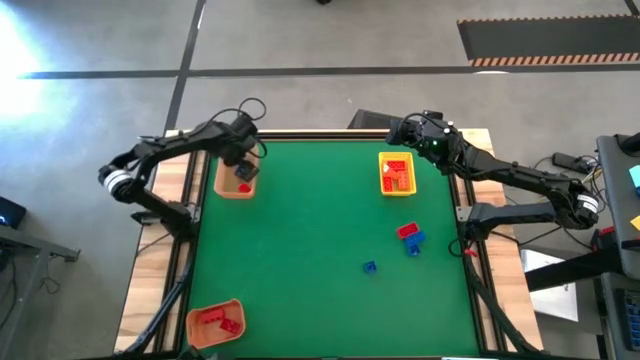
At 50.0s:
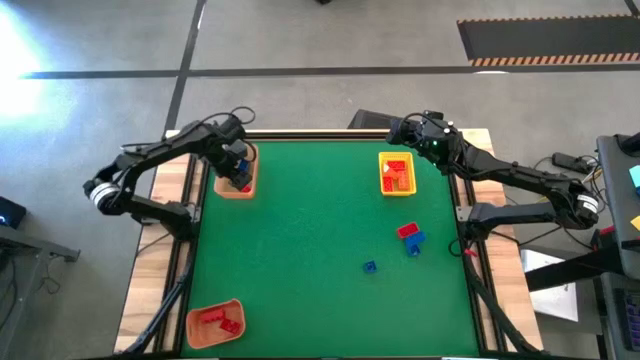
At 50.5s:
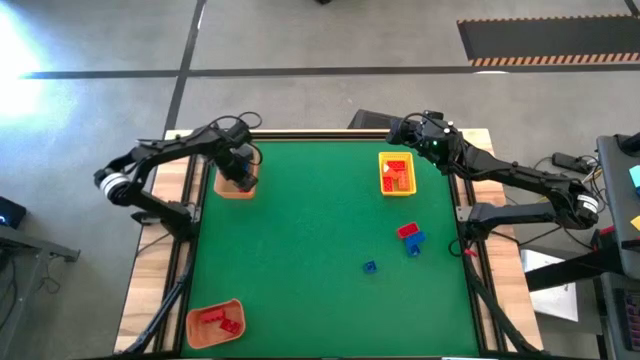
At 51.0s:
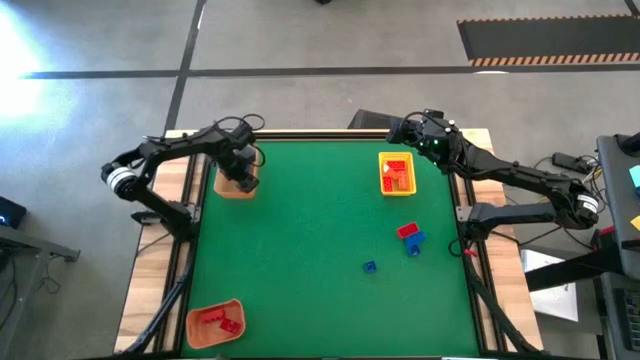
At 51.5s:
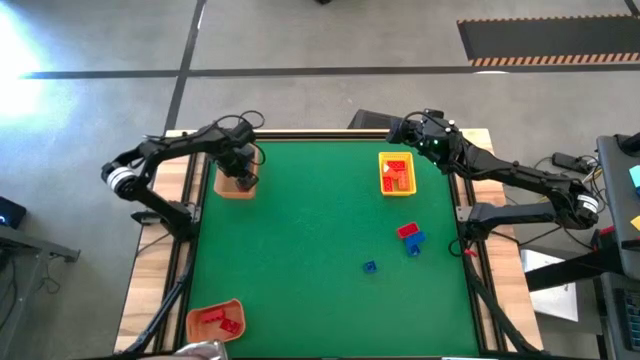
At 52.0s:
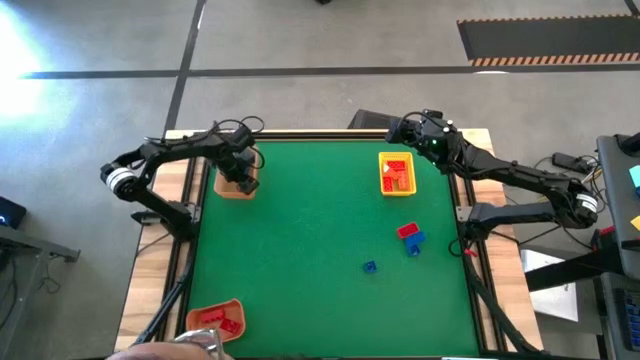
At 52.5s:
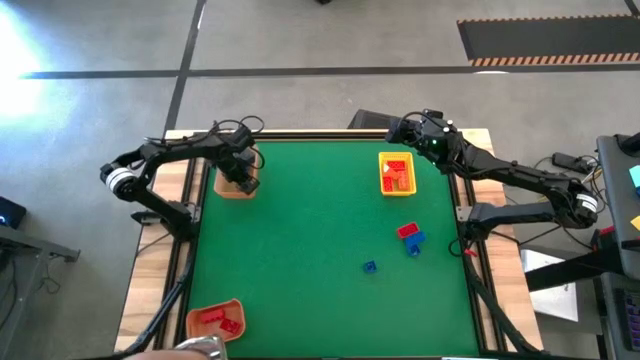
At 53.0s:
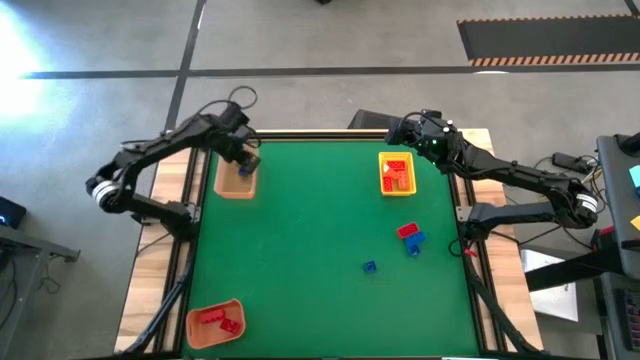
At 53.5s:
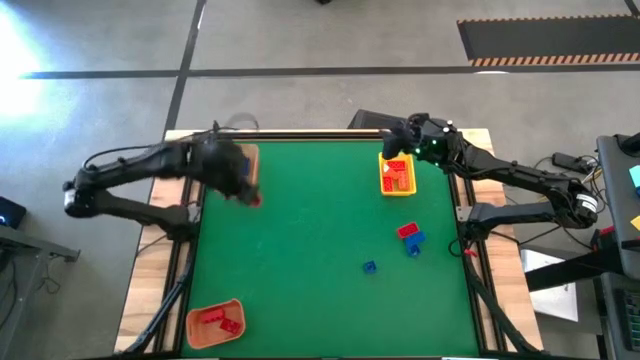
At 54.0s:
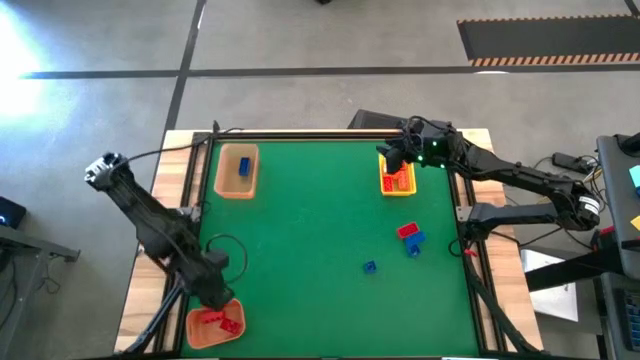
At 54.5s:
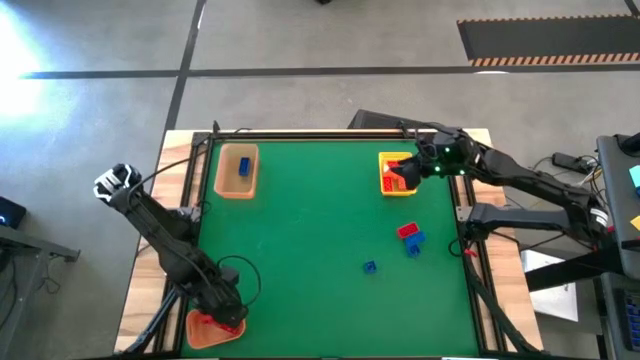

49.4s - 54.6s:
Task: Sort & place blocks by color
Put the red game piece from the light orange bin into the orange bin

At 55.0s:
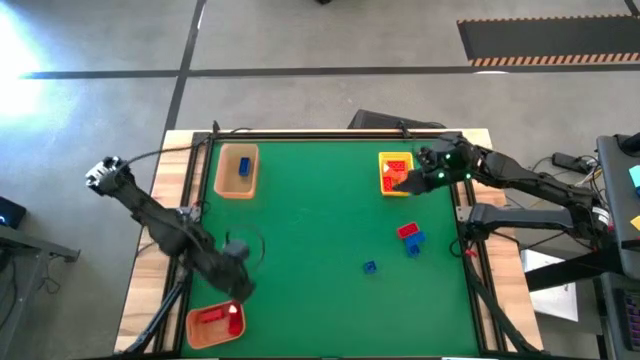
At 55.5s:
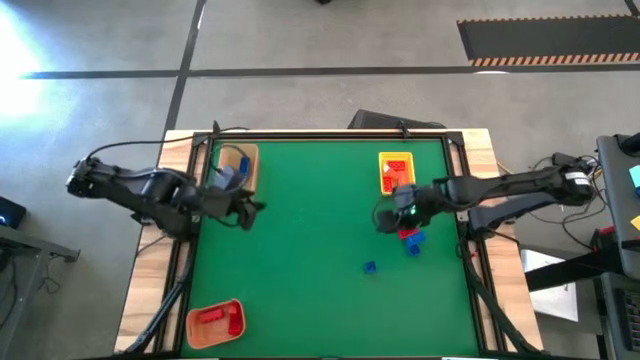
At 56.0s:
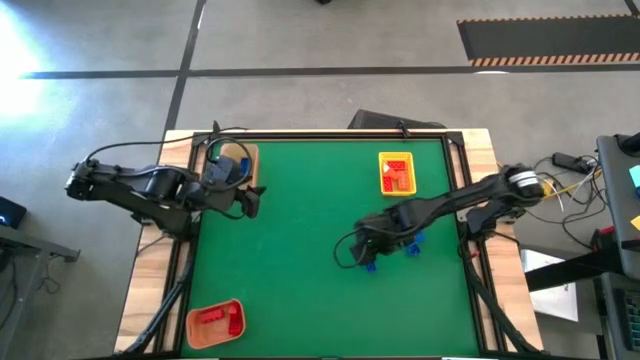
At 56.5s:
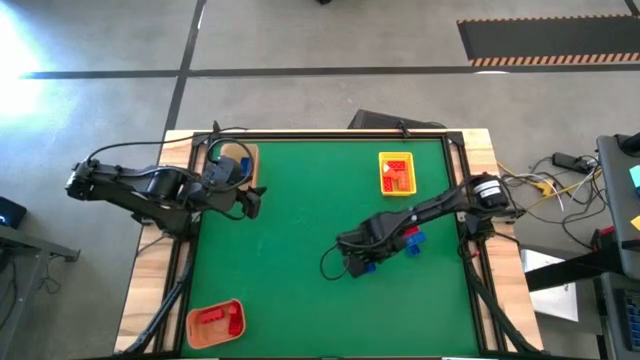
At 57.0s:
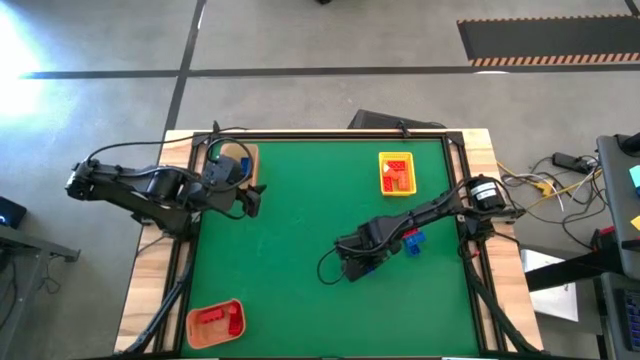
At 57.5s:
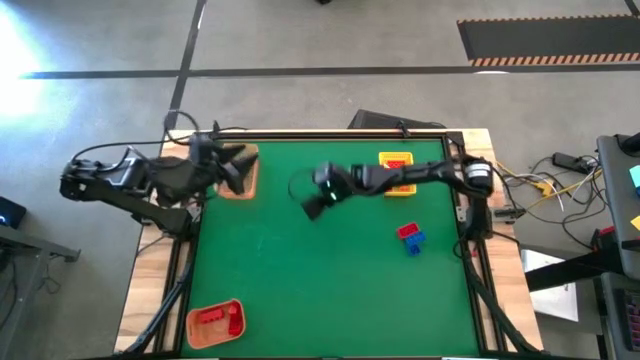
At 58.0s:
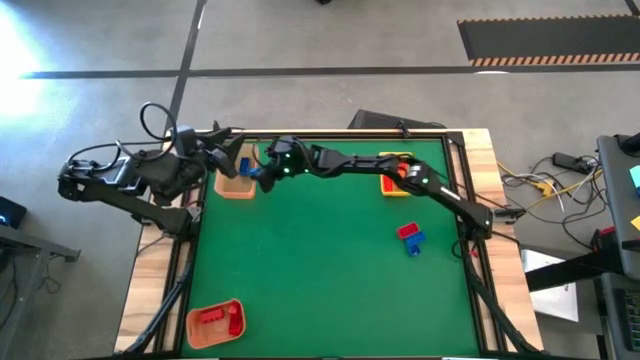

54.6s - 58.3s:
Put the blue game piece into the light orange bin

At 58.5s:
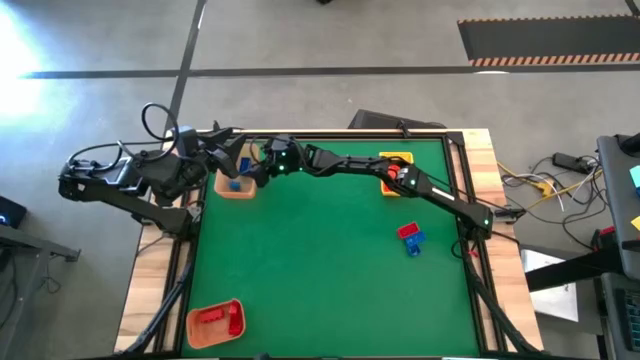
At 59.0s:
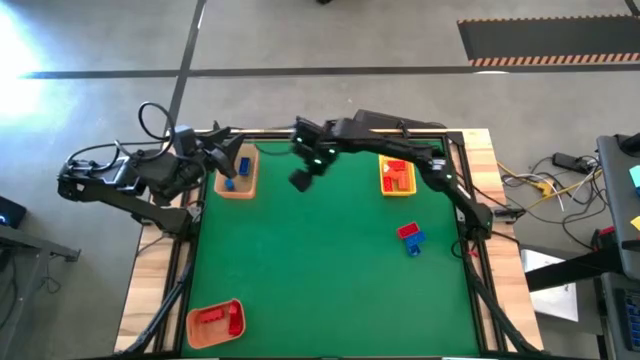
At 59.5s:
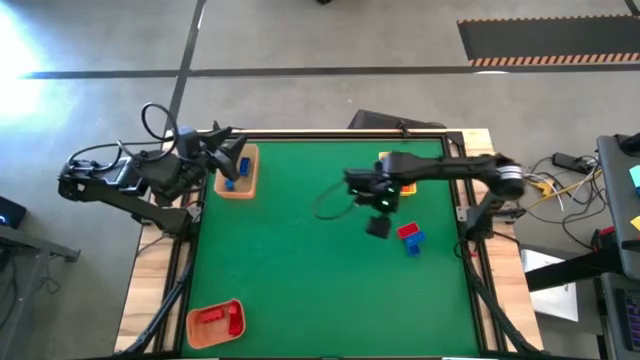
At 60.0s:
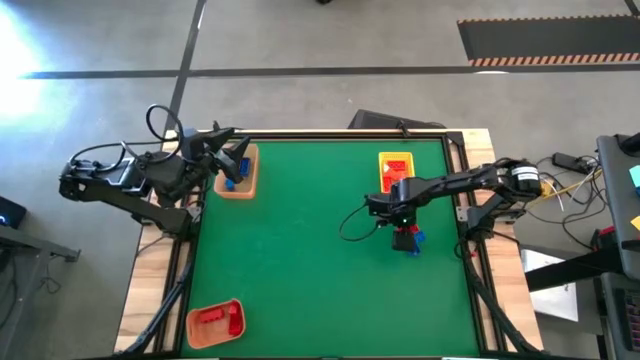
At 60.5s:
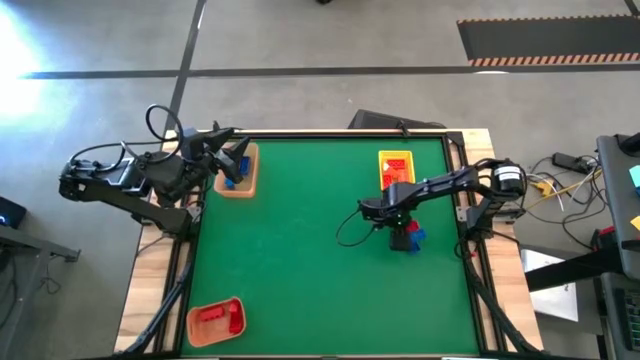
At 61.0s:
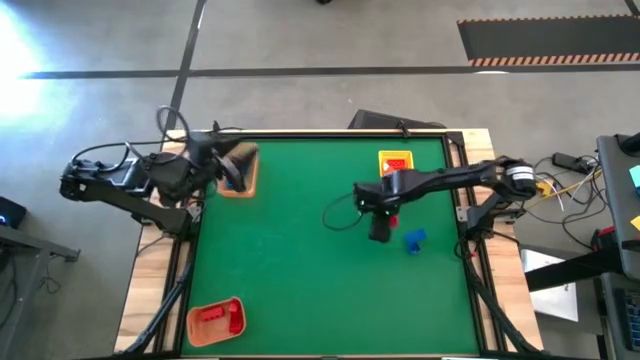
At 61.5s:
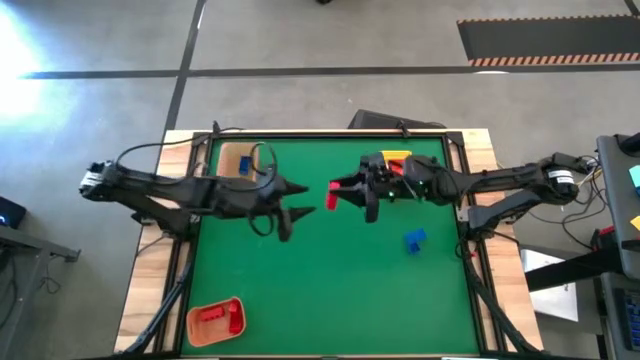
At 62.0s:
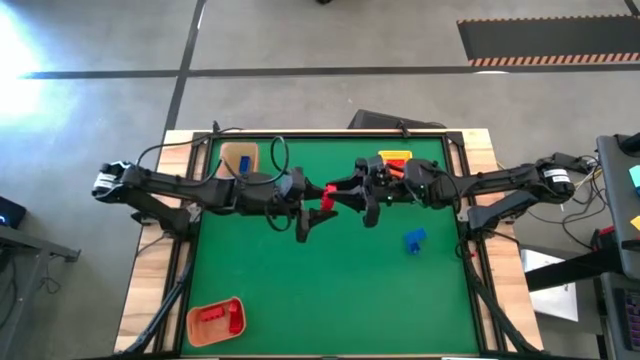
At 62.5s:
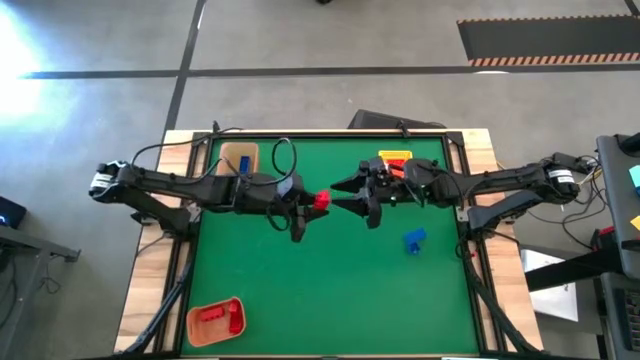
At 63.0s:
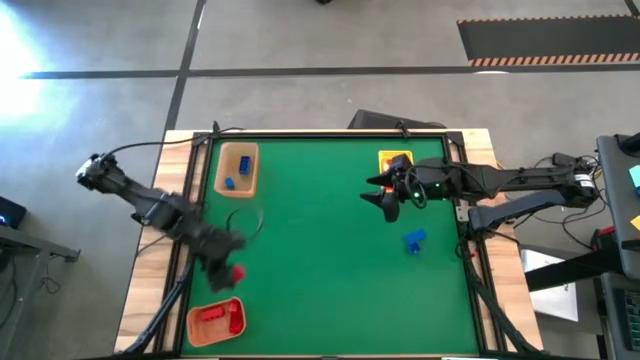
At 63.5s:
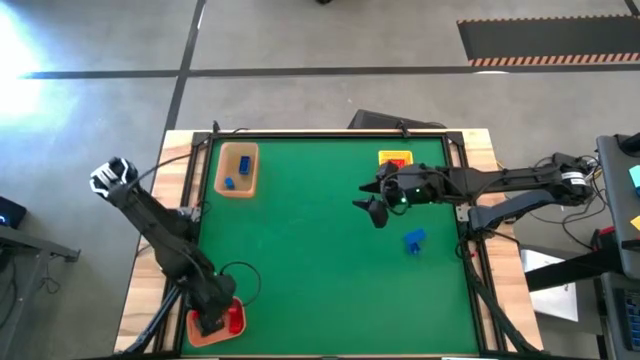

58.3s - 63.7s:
Put the red game piece into the orange bin

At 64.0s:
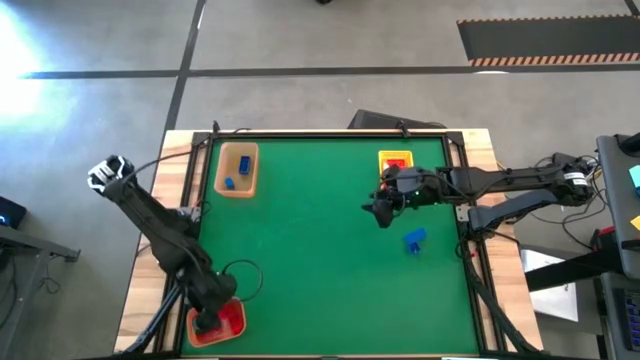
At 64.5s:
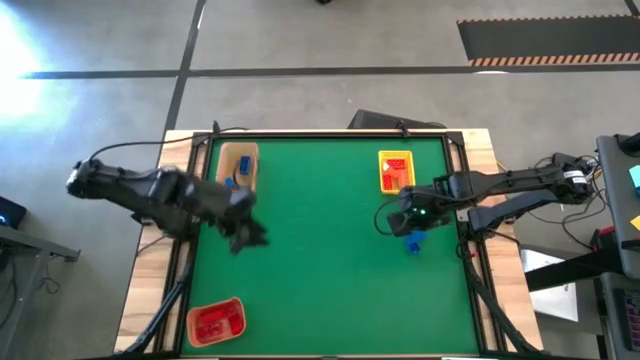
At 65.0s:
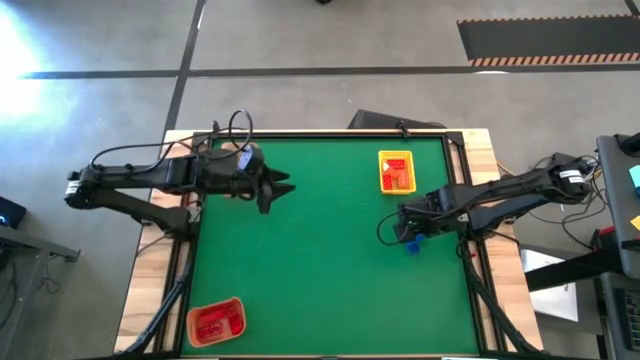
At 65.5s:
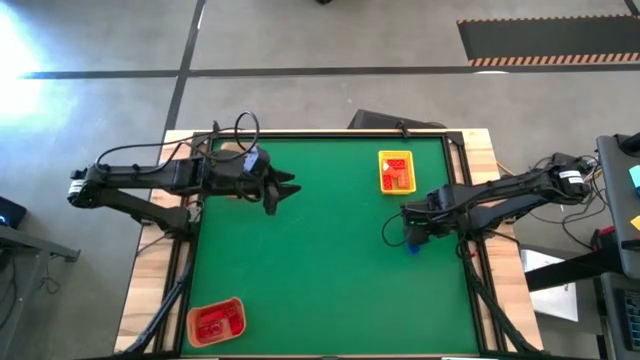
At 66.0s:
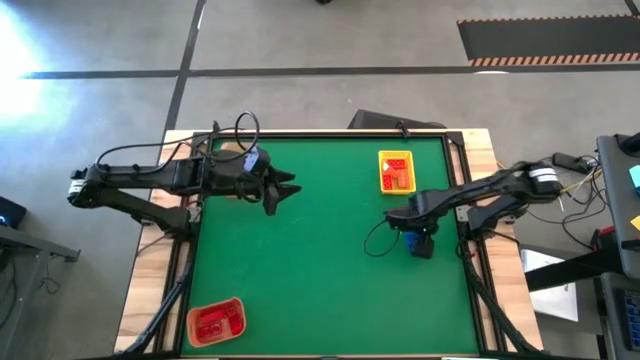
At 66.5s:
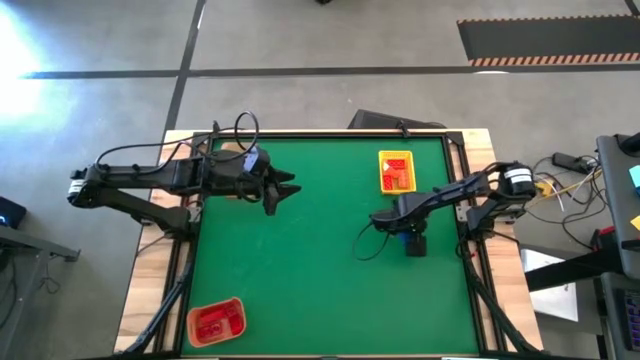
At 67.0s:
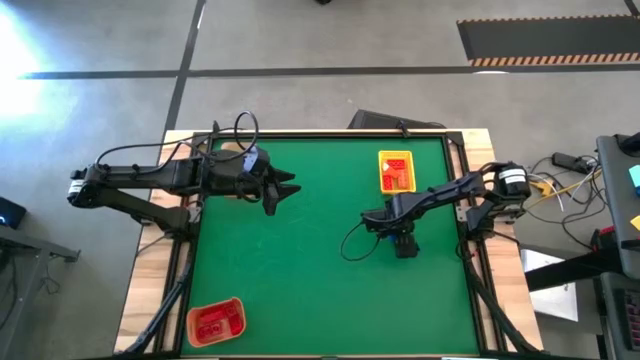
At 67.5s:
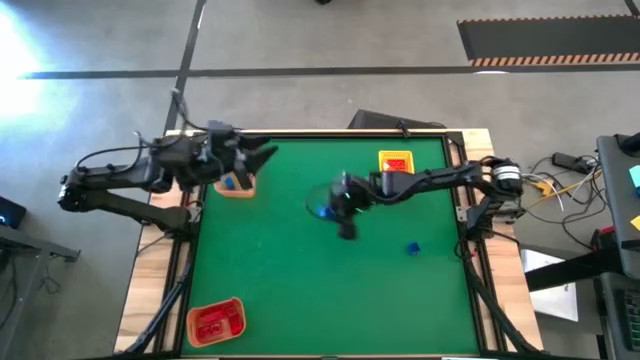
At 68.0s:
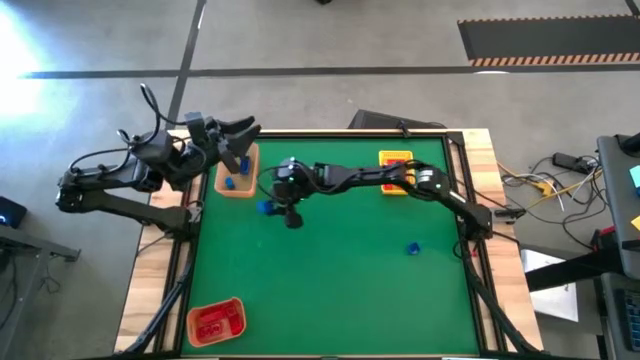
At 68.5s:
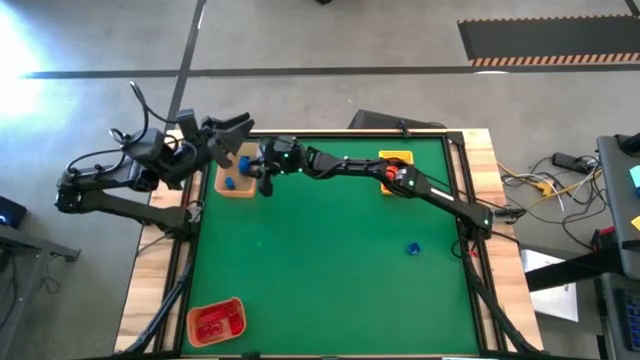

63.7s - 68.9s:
Put the blue game piece into the light orange bin

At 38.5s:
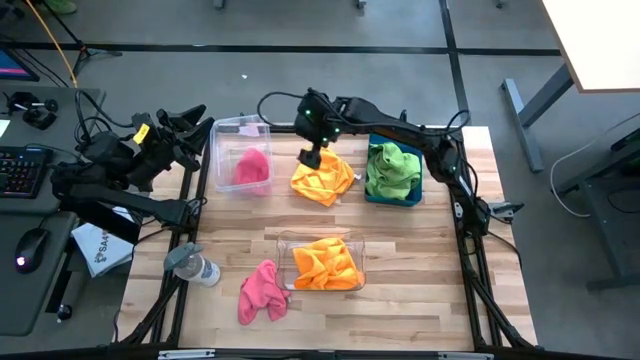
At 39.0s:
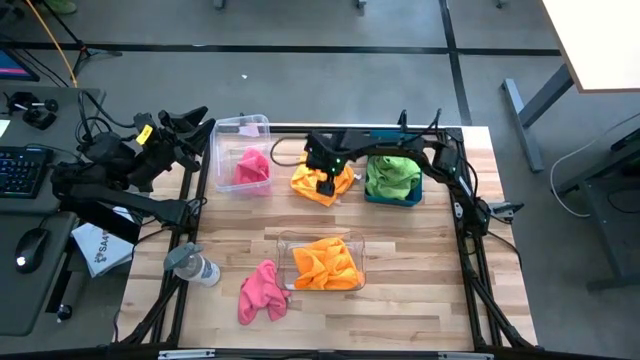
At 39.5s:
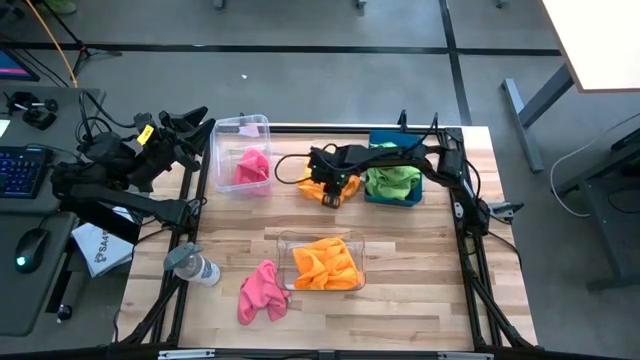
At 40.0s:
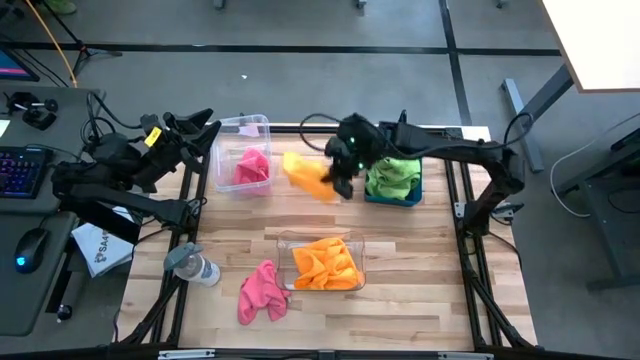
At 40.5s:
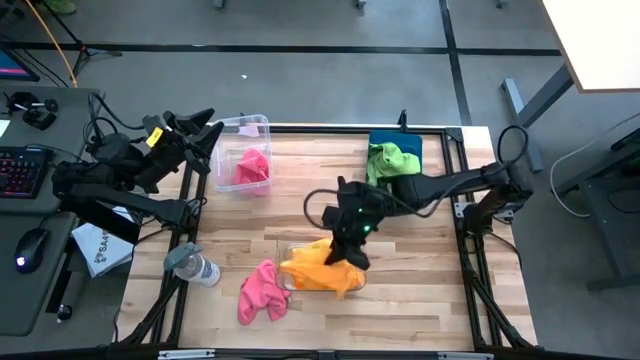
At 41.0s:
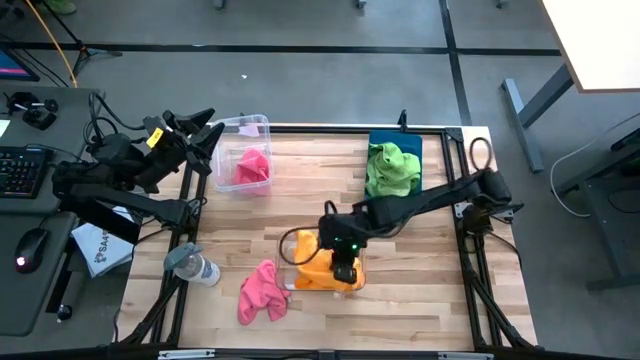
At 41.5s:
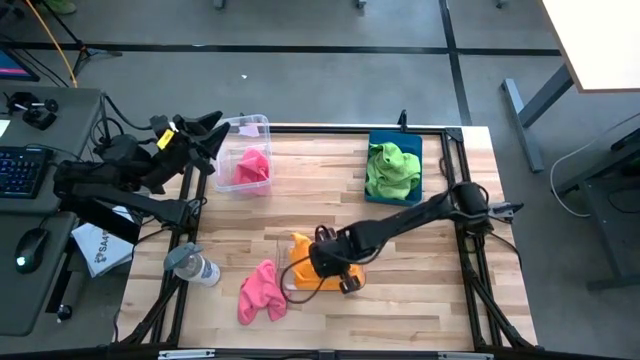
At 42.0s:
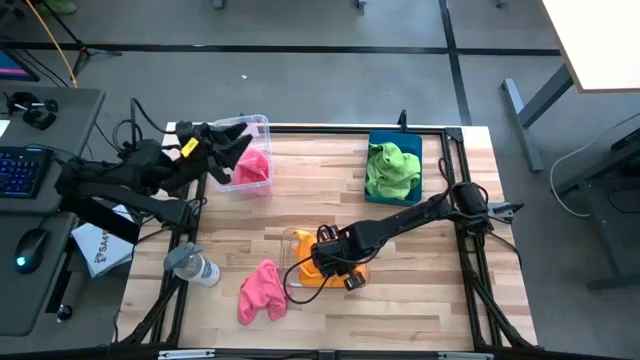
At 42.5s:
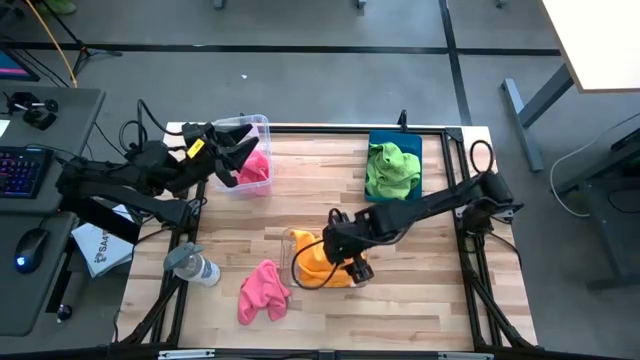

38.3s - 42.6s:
Task: Sort microfiber towel by color & place in baskets
Put the yellow microfiber towel into the bottom transparent bin
